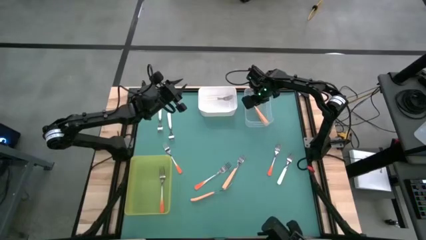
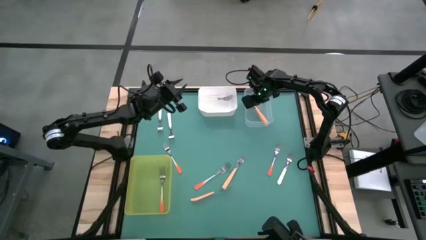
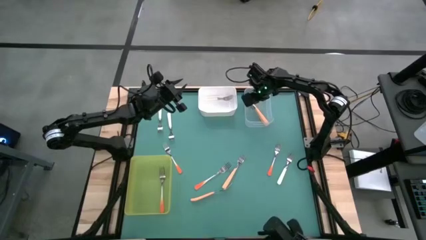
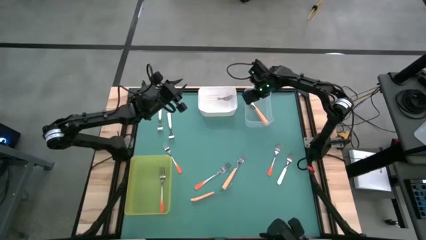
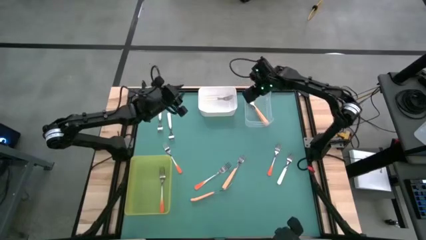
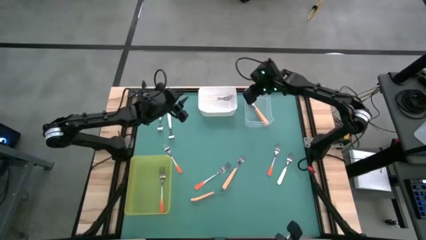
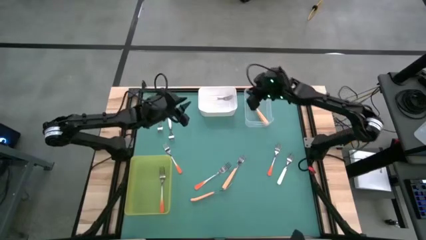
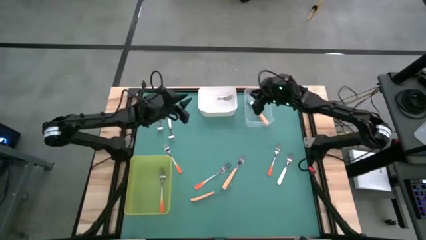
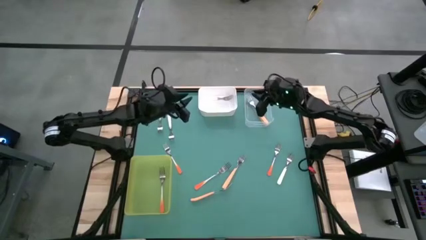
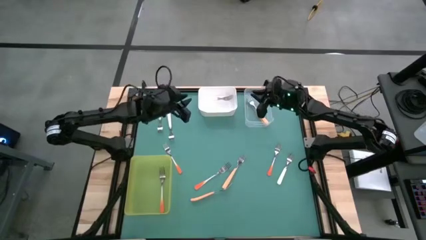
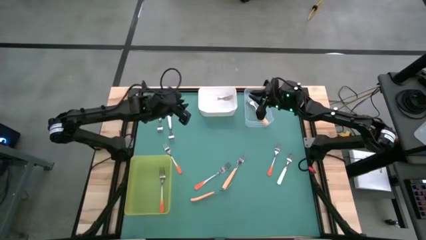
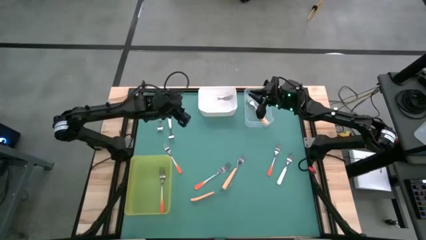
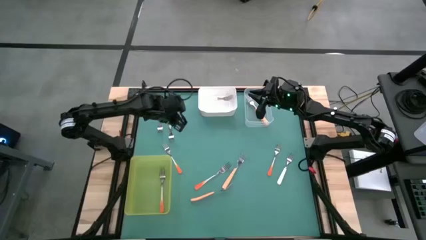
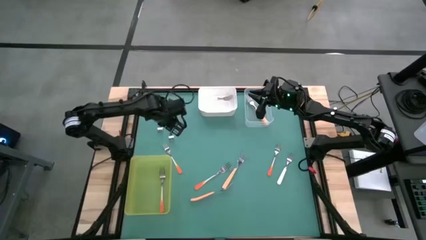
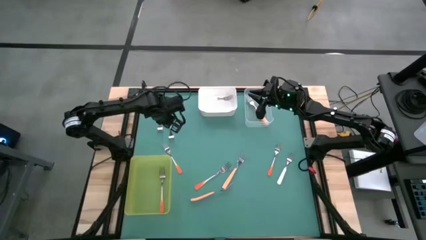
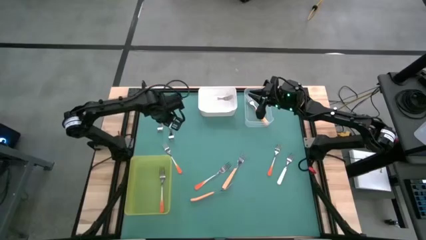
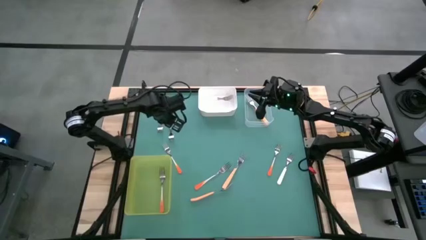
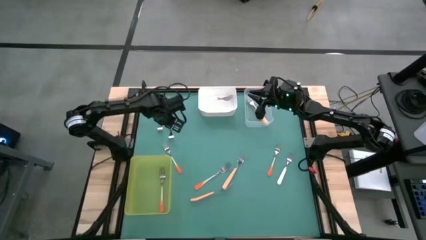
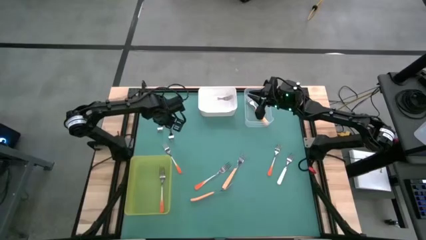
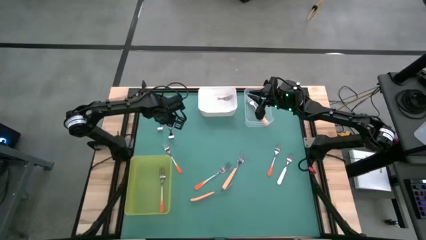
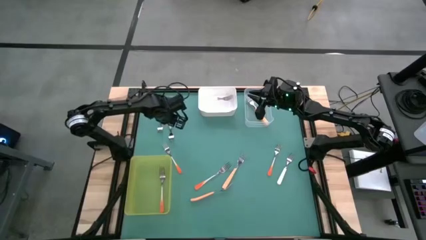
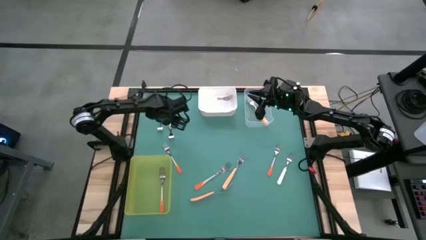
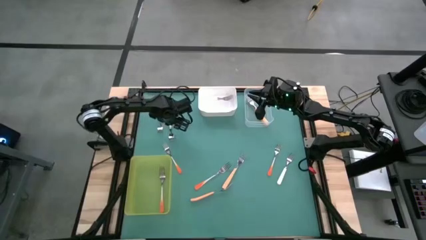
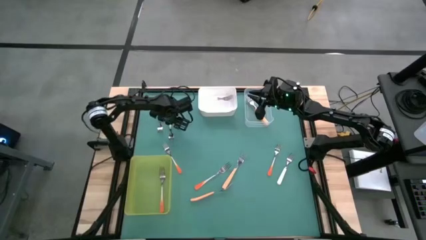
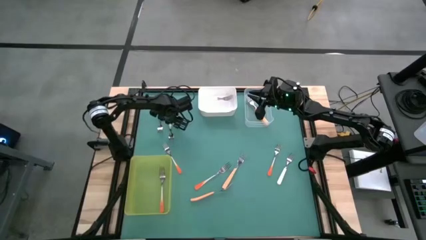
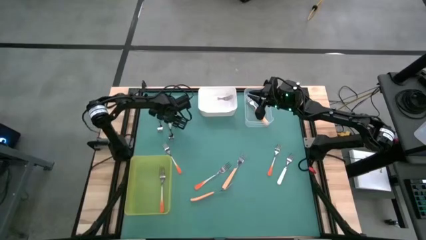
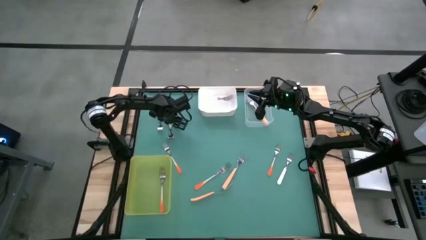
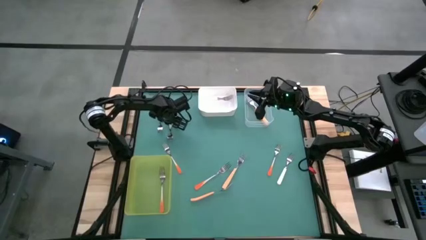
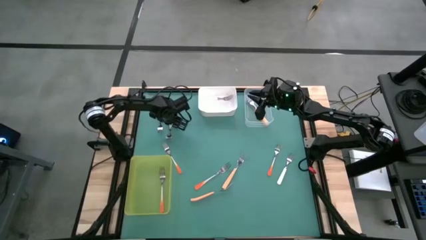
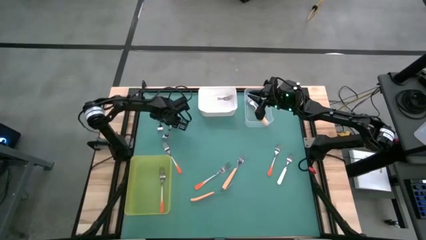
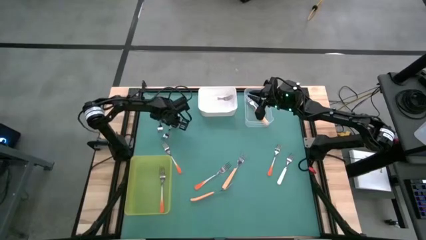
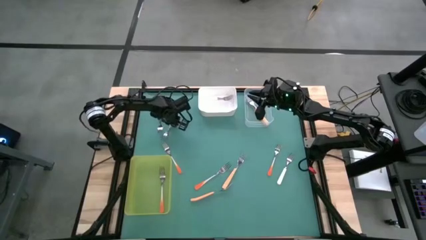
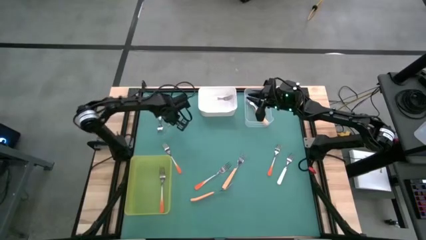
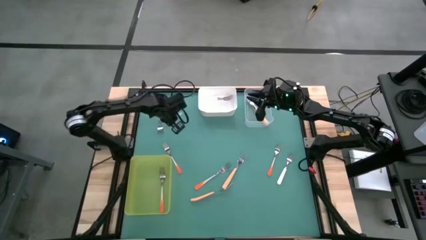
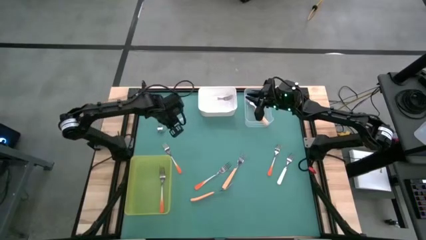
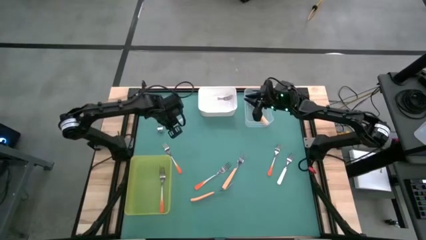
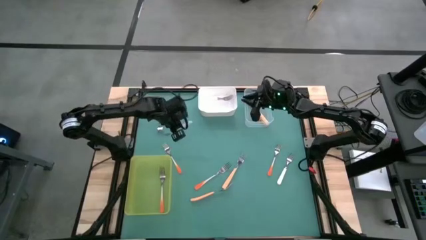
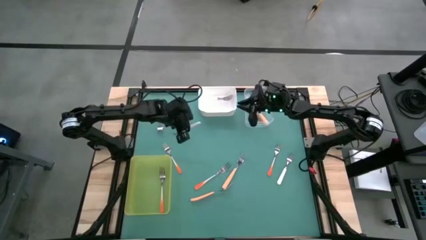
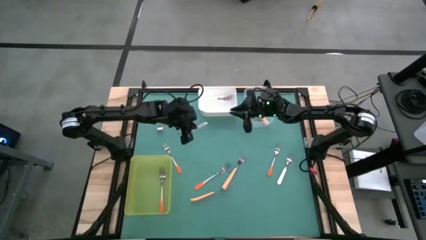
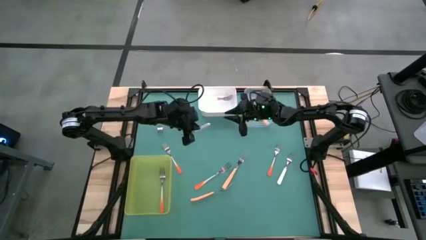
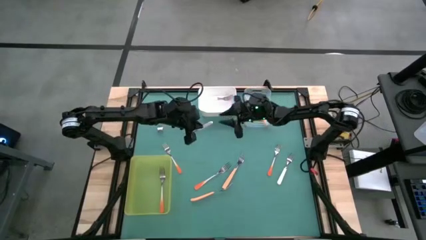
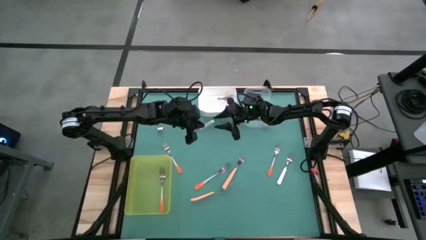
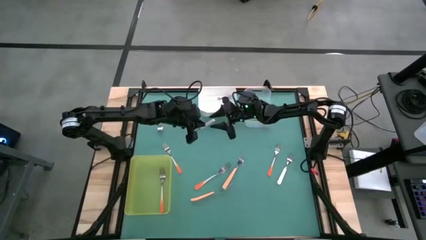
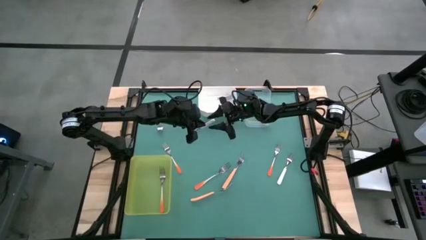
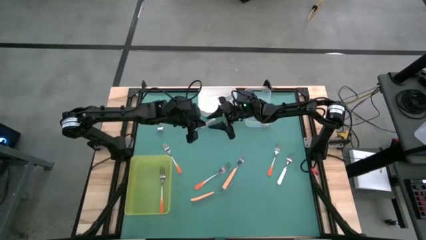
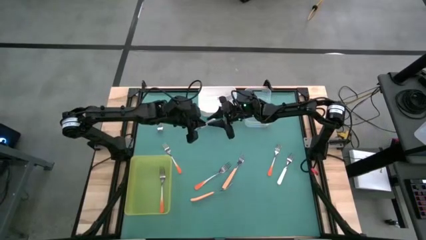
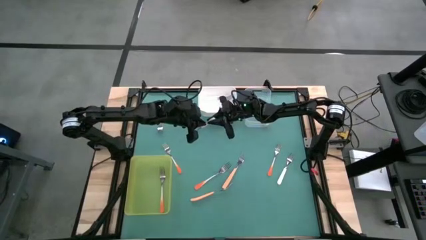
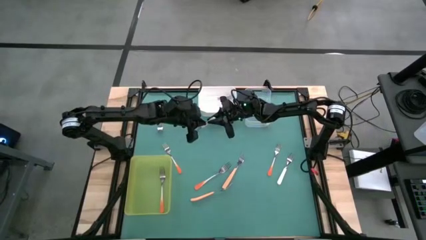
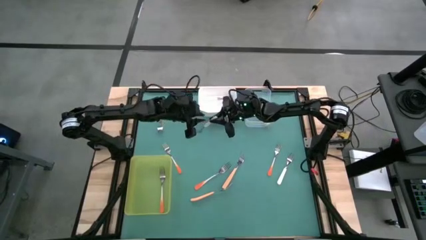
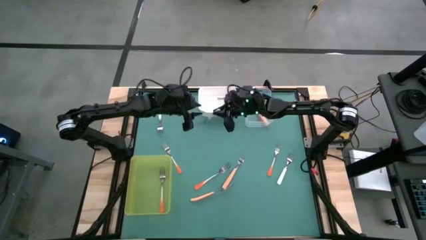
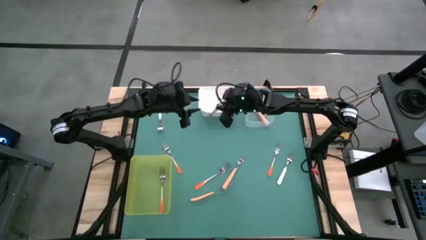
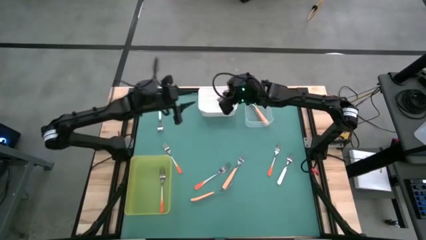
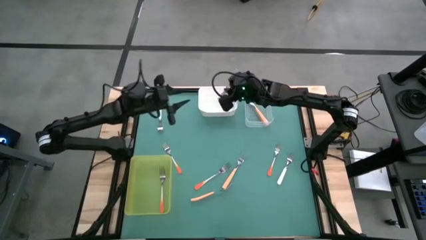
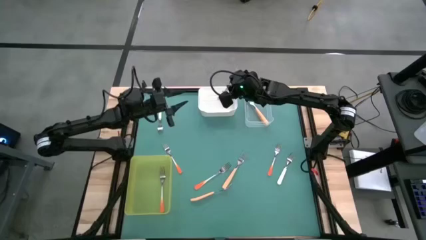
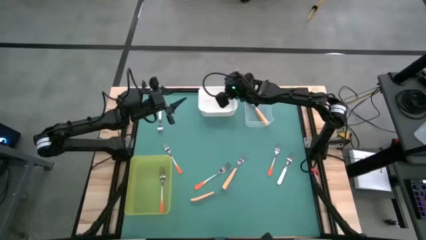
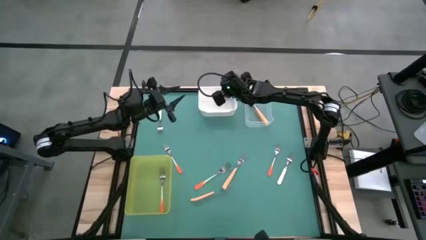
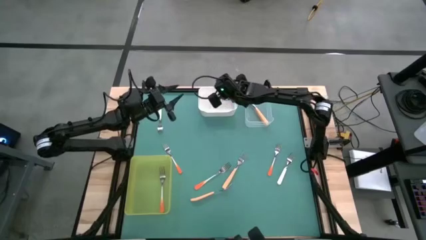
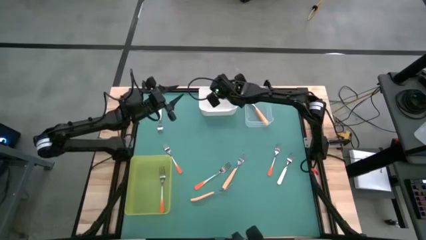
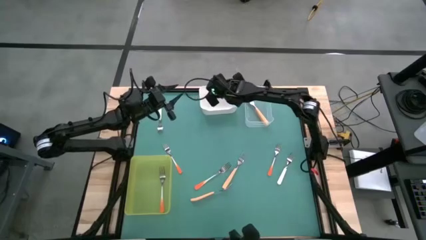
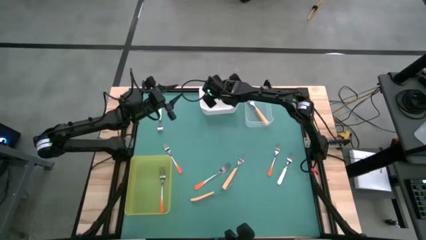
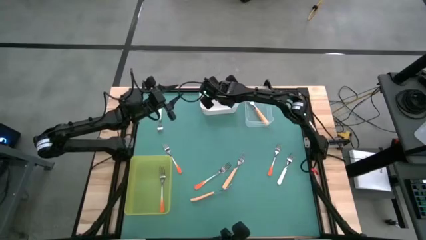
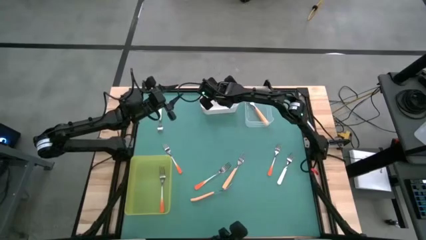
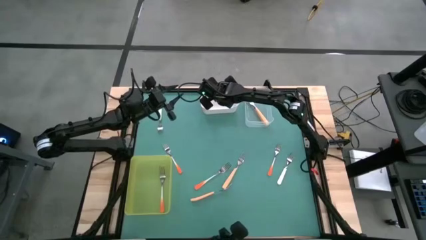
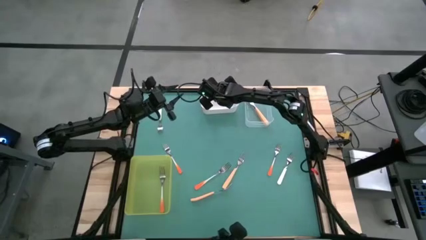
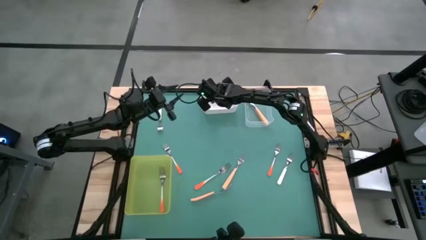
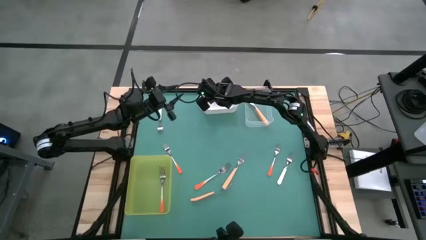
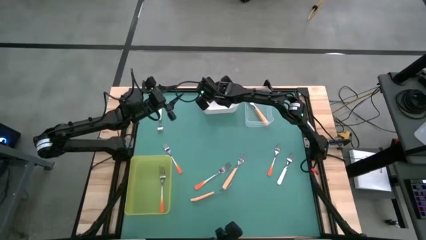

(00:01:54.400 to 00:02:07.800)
Task: Sort silverware by color (type)
Put the white fork into the white bin

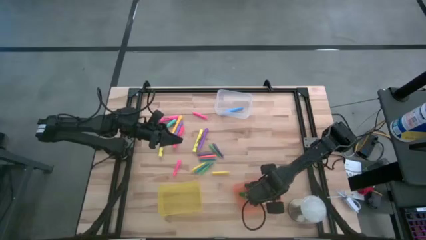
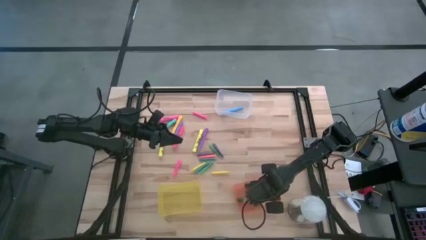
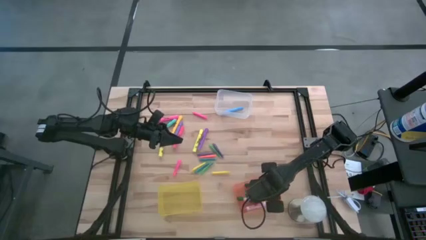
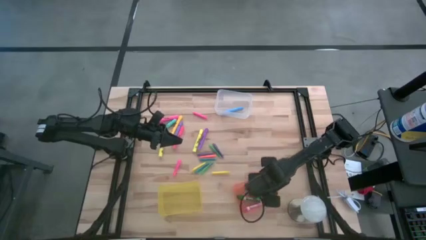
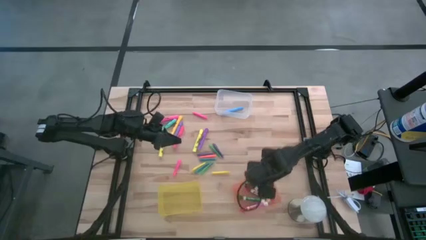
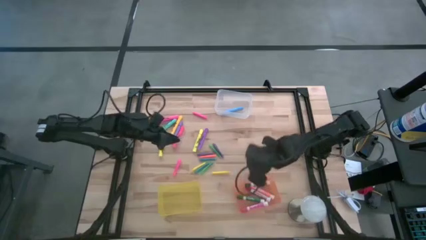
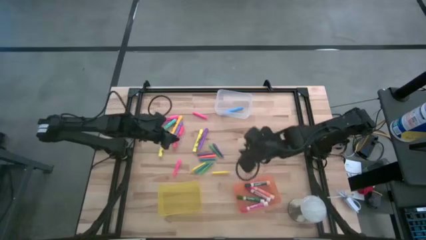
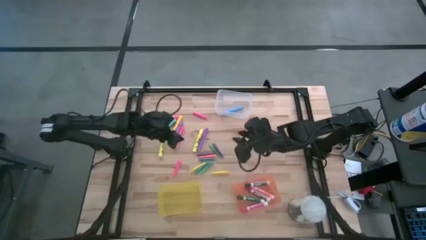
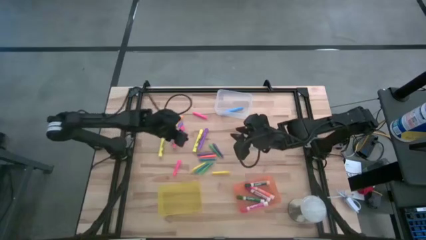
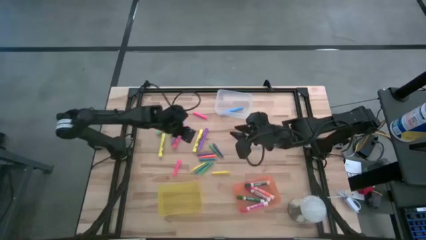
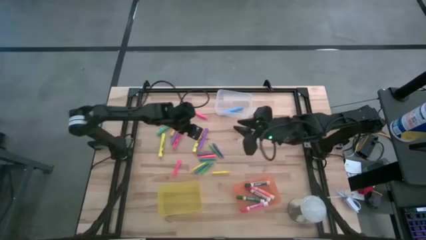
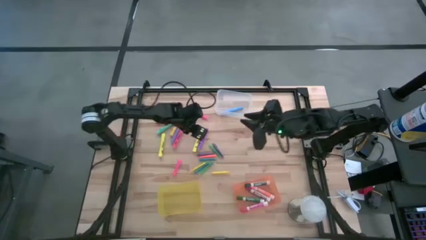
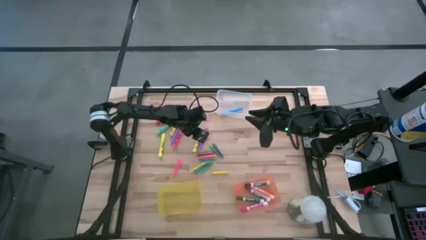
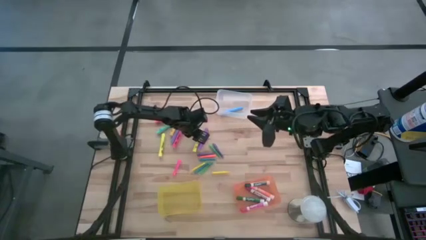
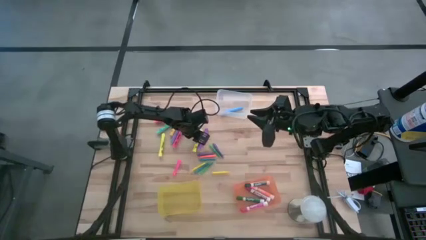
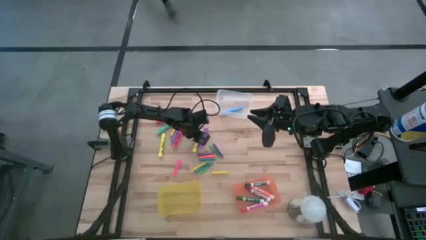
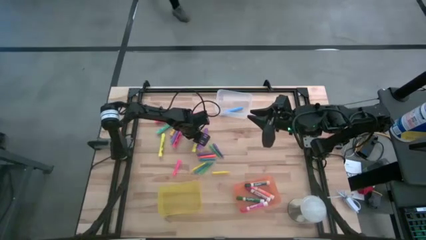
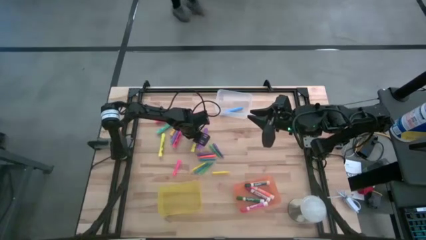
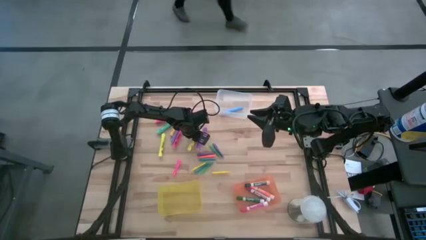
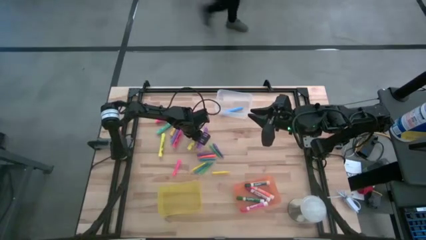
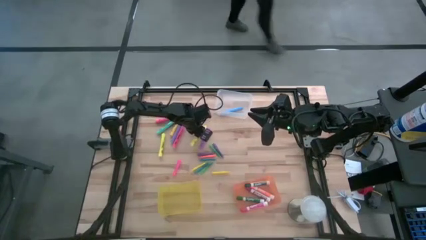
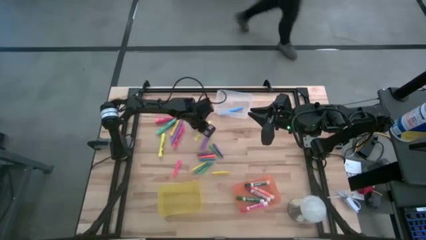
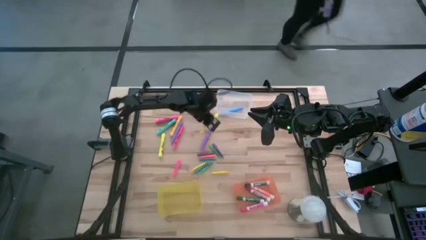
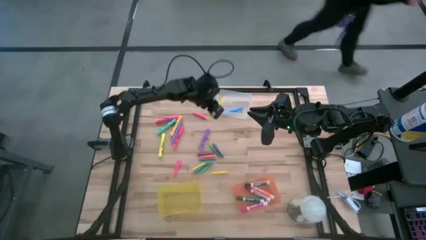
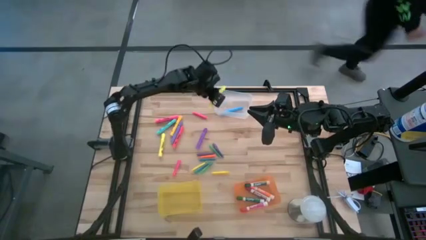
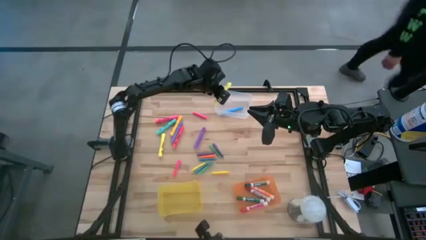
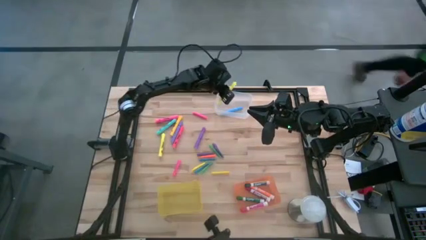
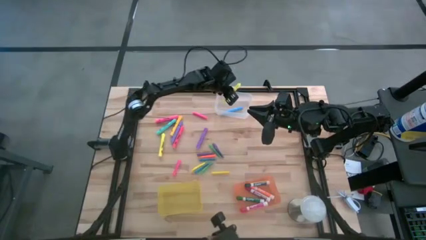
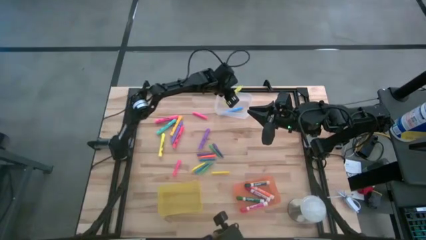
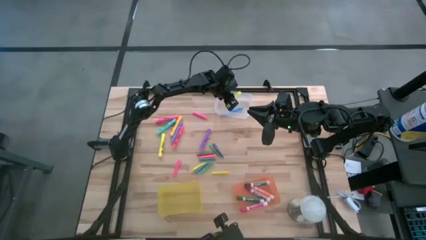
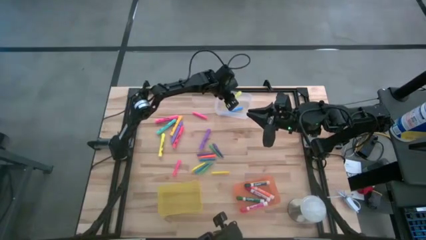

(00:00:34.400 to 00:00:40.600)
Task: Pick & Place Markers
Put the right yellow highlighter pen into the transparent bin
